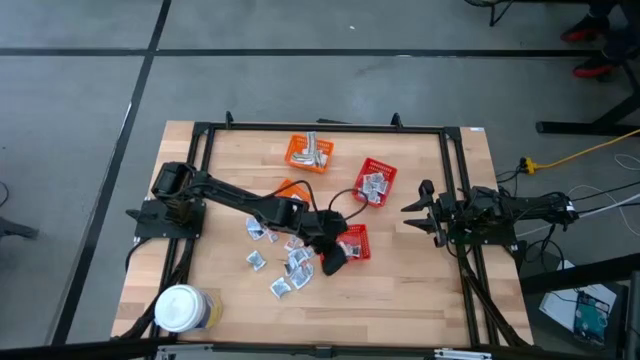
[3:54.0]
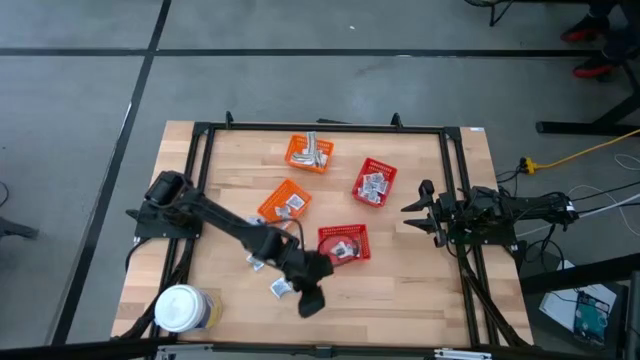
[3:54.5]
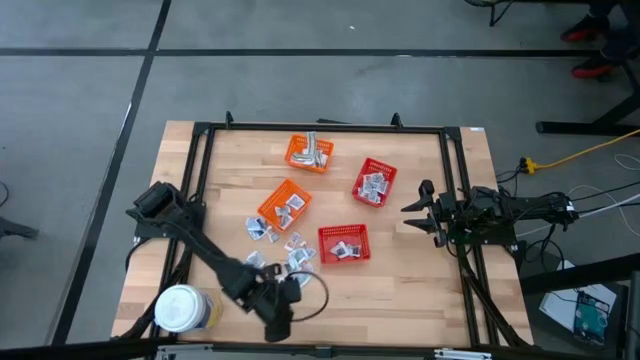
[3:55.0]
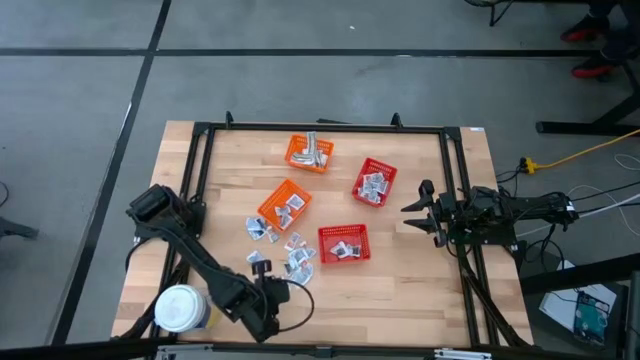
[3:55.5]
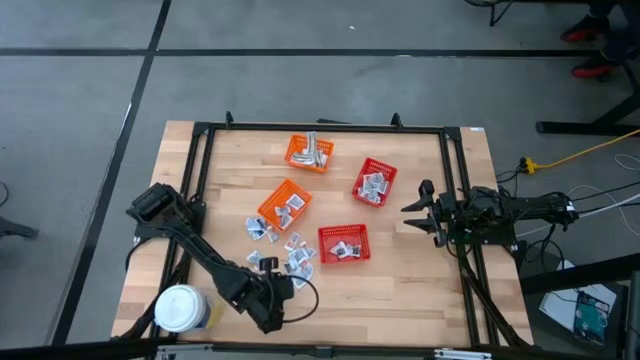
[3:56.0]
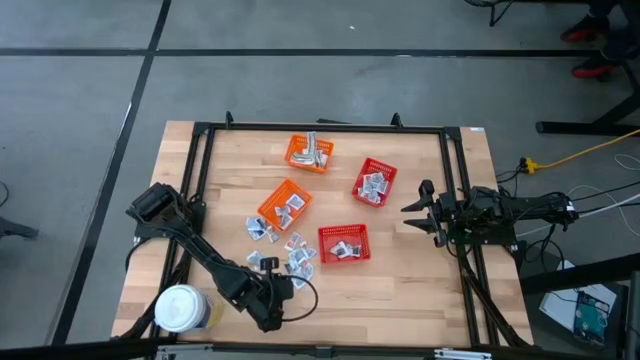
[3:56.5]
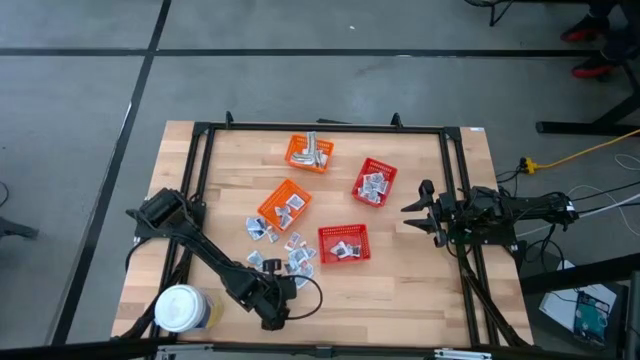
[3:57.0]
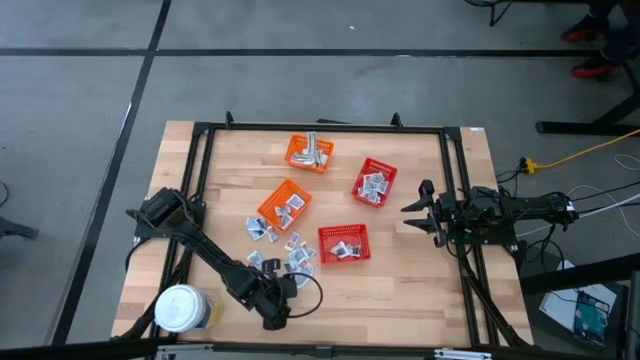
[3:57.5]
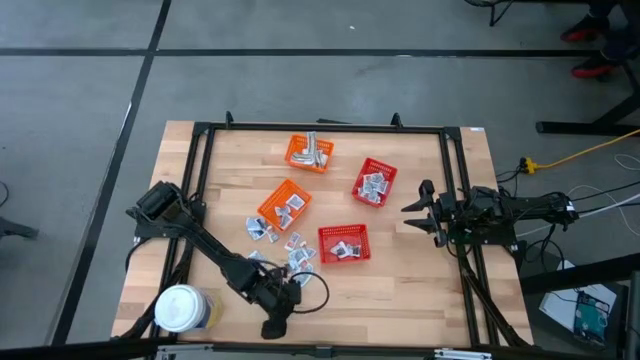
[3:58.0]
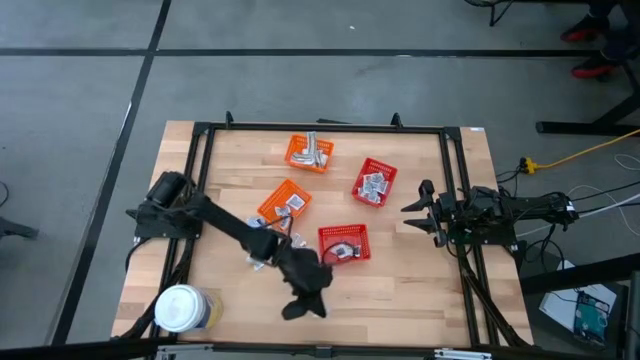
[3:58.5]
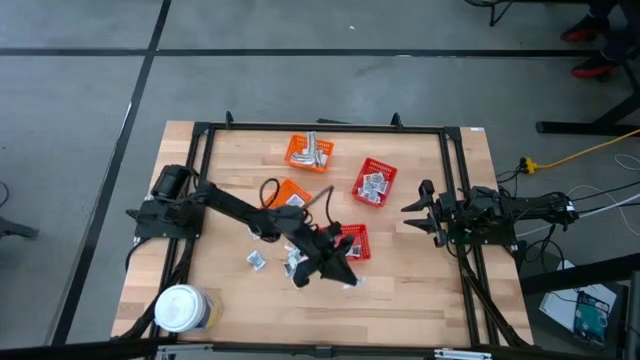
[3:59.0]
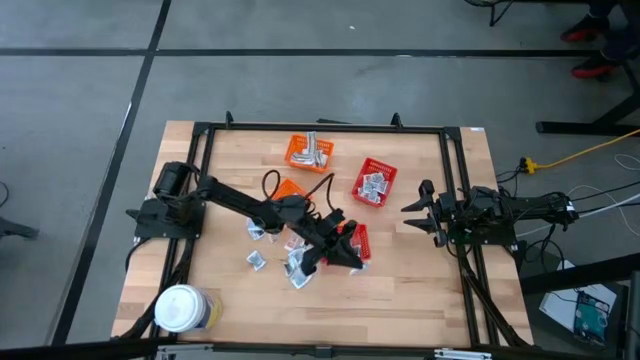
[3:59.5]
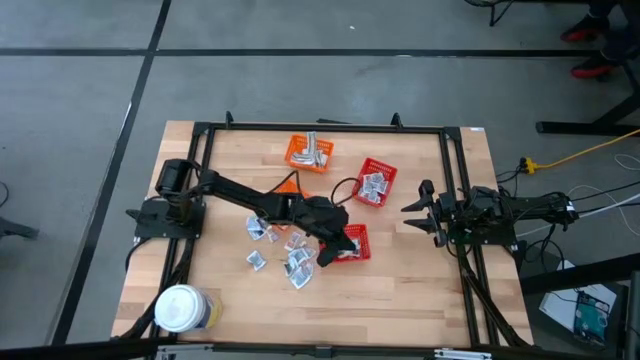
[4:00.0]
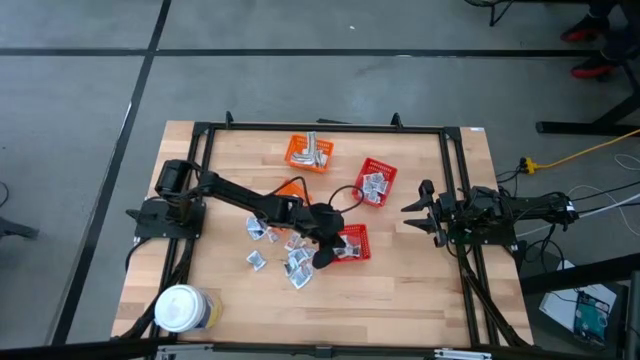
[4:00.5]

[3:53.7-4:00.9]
Task: Pick & Place First Aid Supplies
Put the gray towelette pack into the bottom red bin

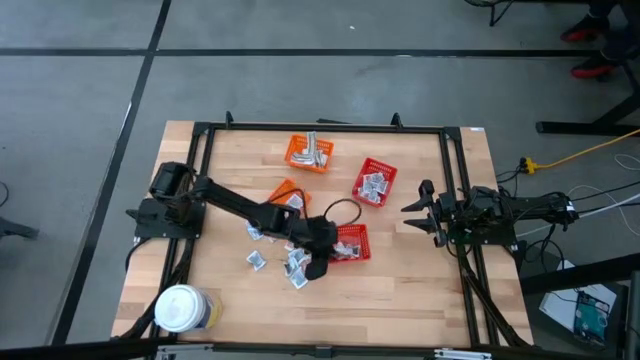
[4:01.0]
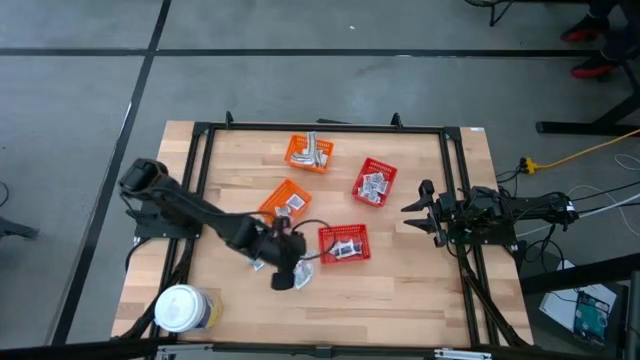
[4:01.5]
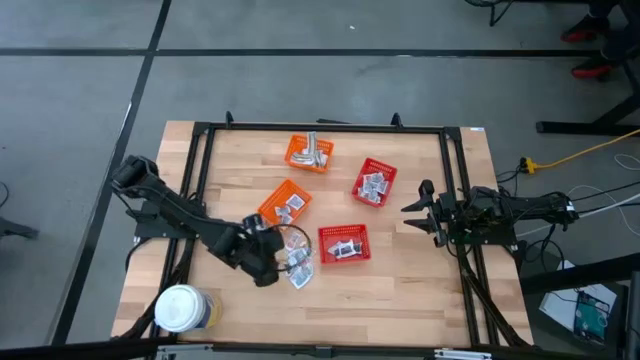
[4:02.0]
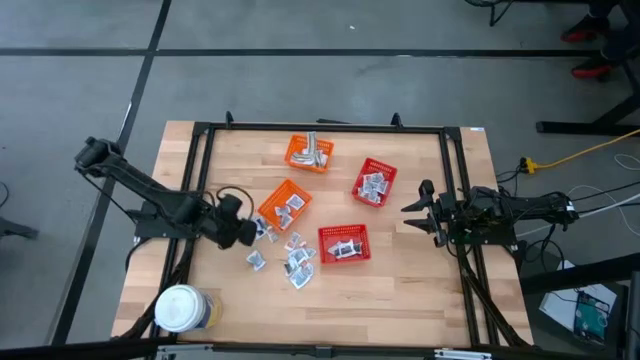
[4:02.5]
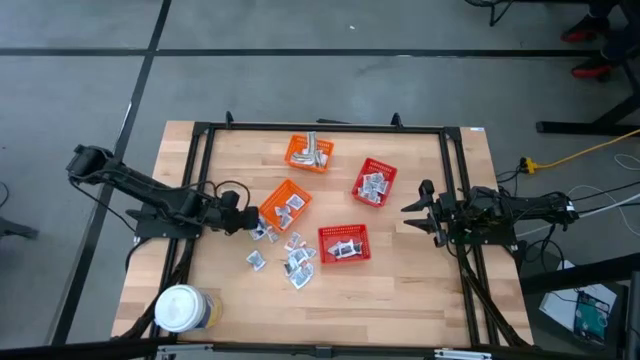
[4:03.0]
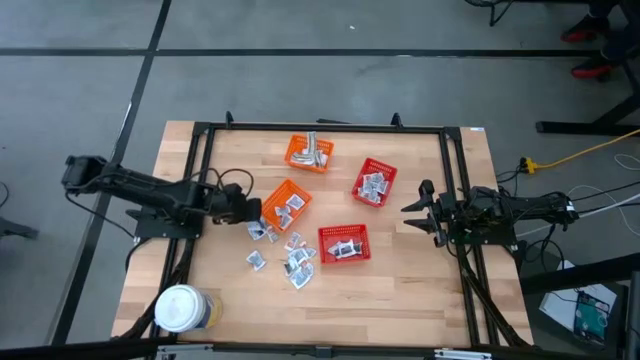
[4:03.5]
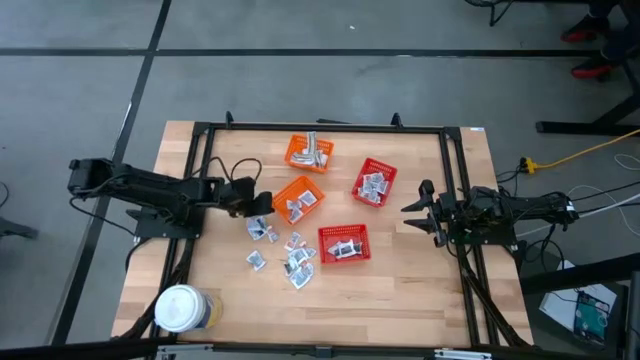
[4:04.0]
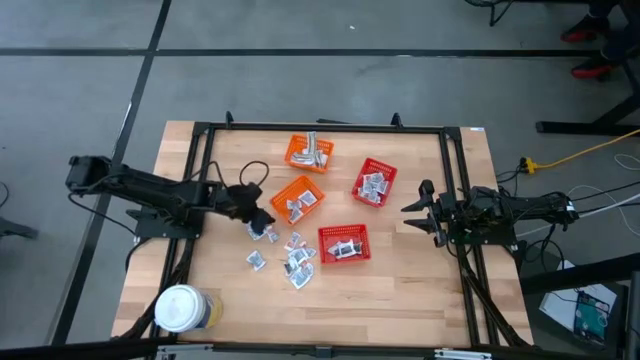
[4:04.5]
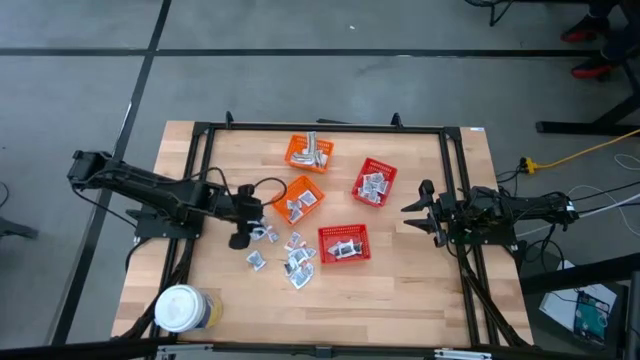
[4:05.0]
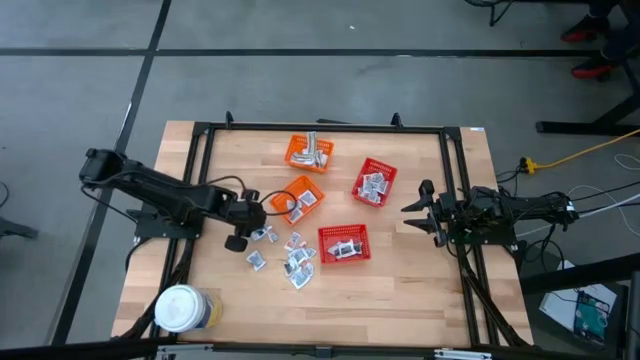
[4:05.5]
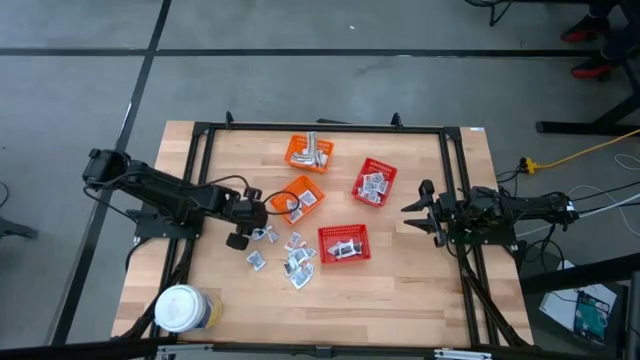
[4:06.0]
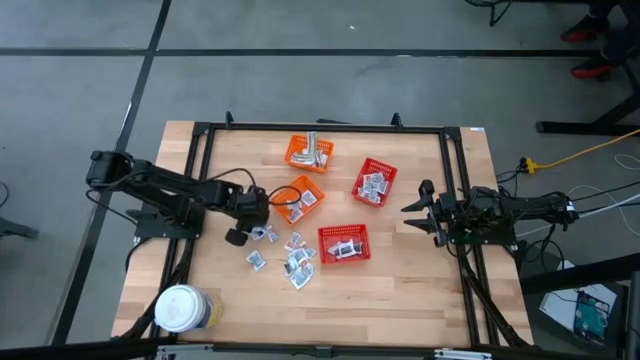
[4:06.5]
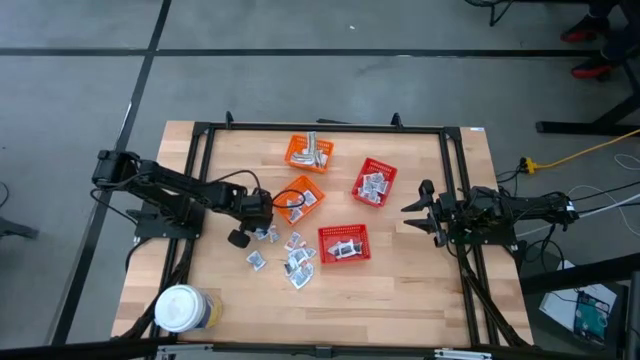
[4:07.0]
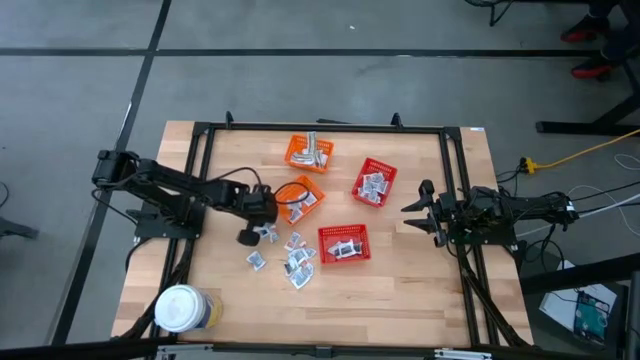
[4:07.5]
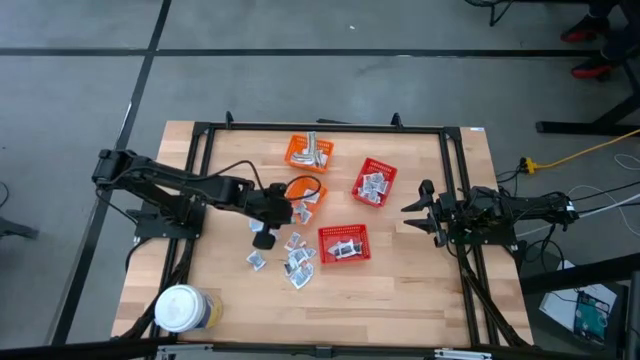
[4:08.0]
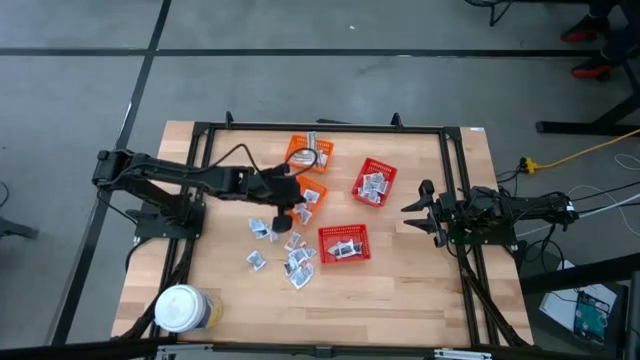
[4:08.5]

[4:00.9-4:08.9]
Put the blue alcohol pad into the bottom orange bin

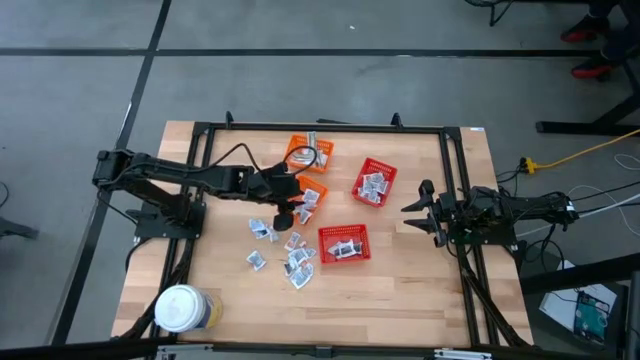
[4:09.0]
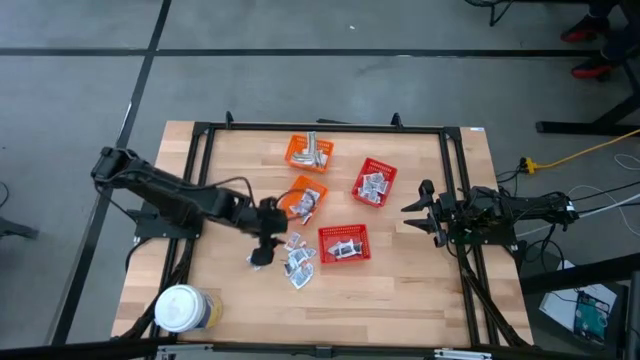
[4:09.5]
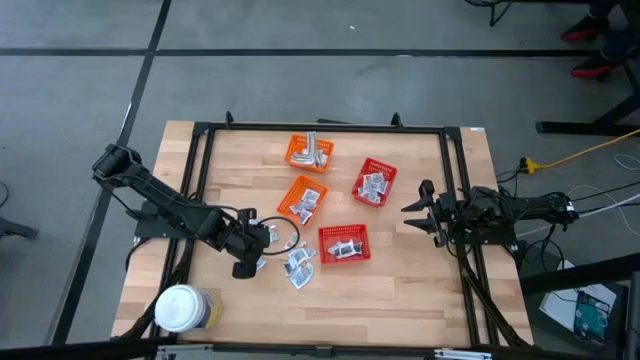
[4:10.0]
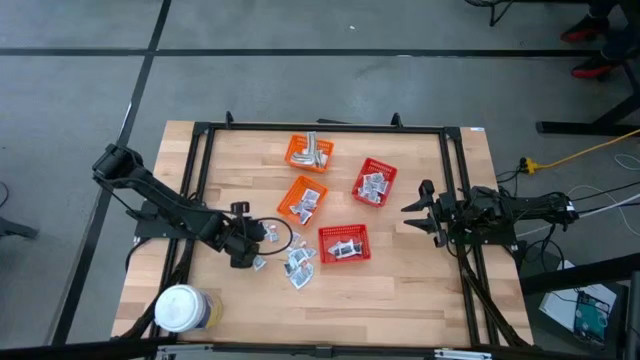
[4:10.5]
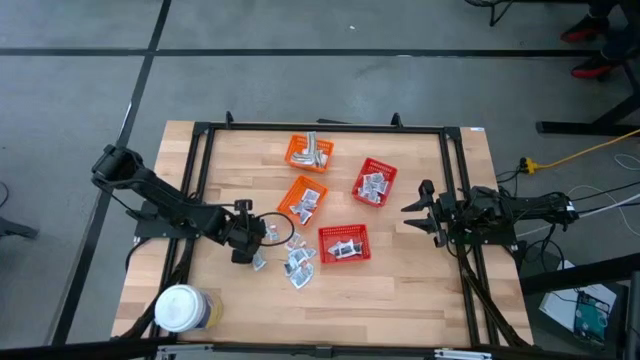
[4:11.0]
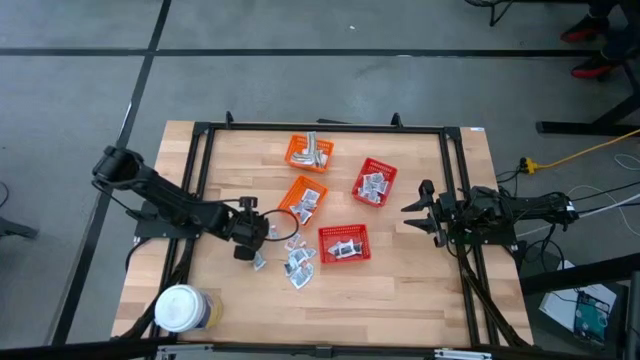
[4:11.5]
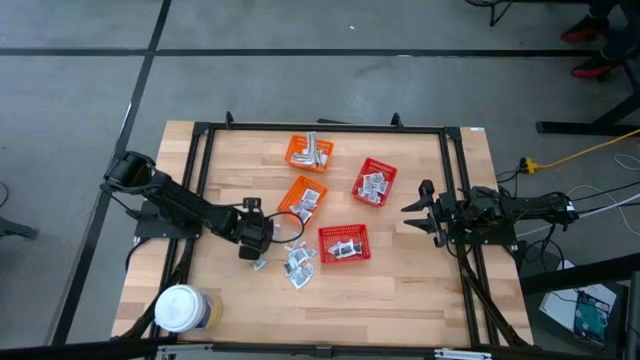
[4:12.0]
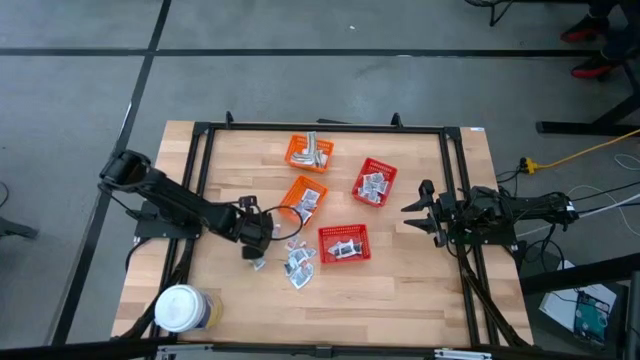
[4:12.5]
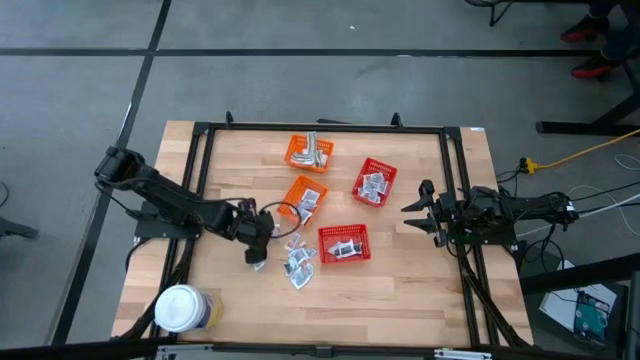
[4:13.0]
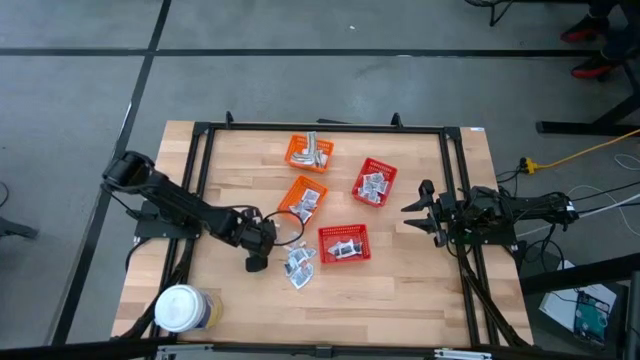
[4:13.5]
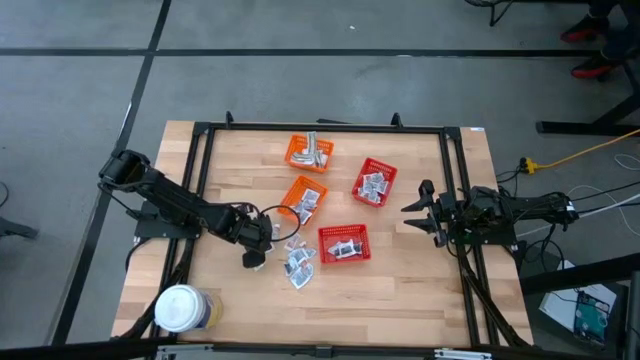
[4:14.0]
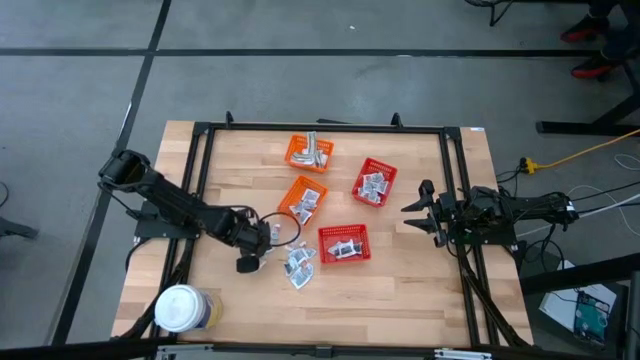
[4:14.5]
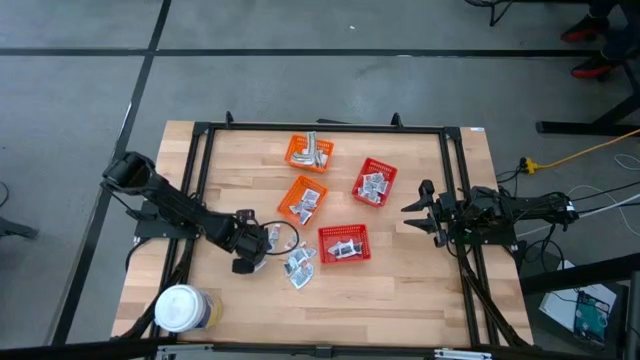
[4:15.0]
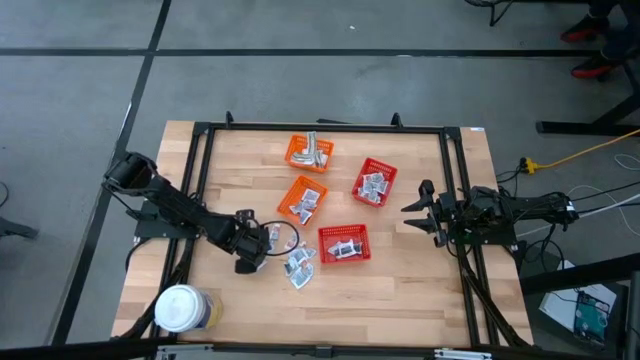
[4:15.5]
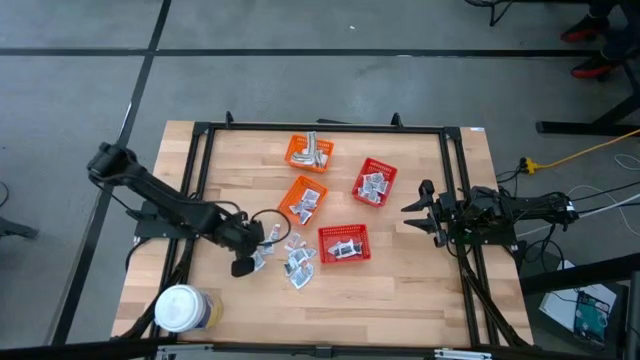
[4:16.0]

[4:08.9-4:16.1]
Put the blue alcohol pad into the bottom orange bin
